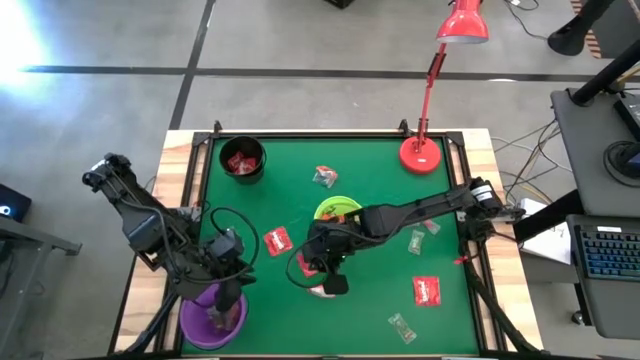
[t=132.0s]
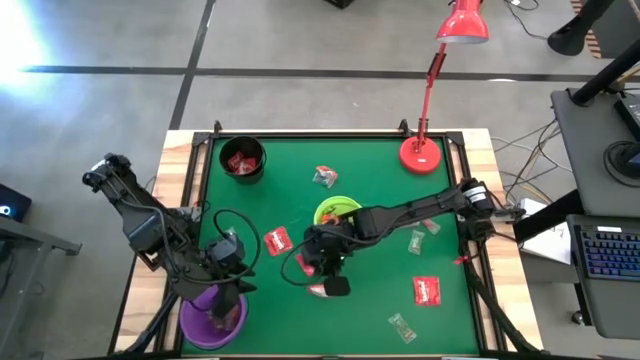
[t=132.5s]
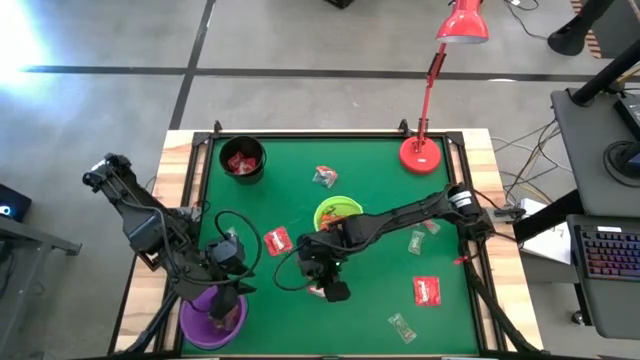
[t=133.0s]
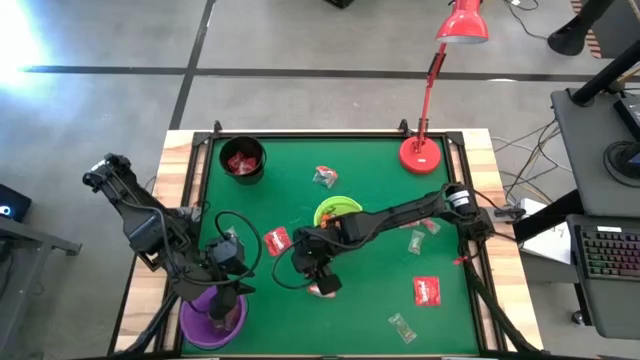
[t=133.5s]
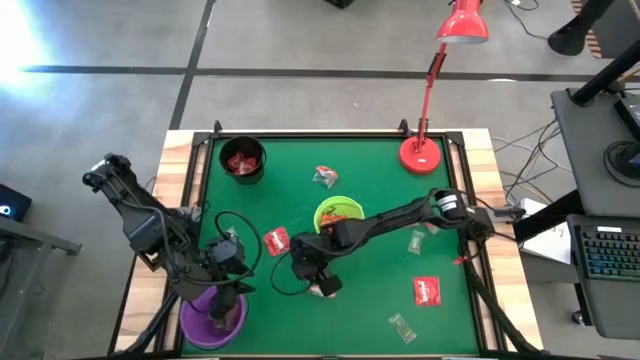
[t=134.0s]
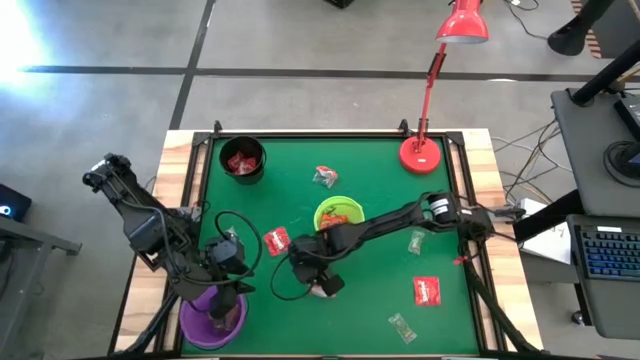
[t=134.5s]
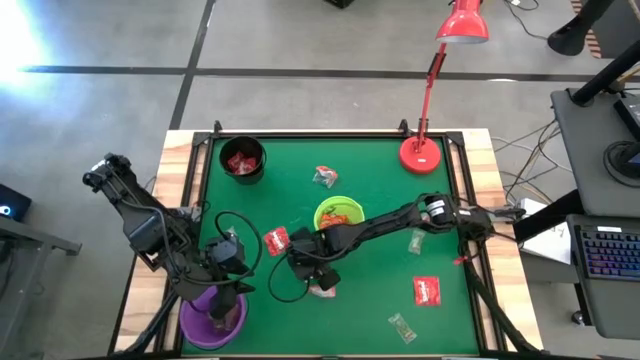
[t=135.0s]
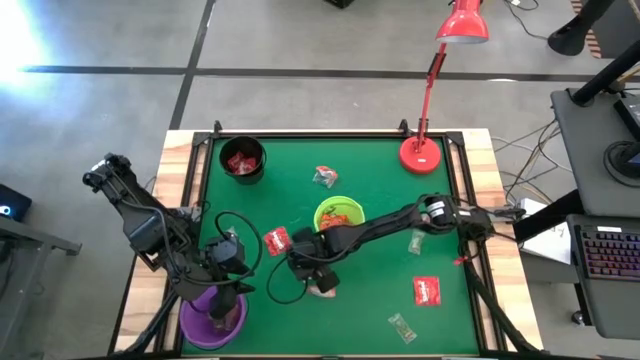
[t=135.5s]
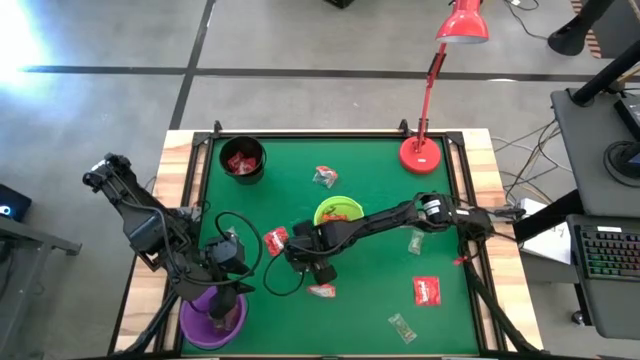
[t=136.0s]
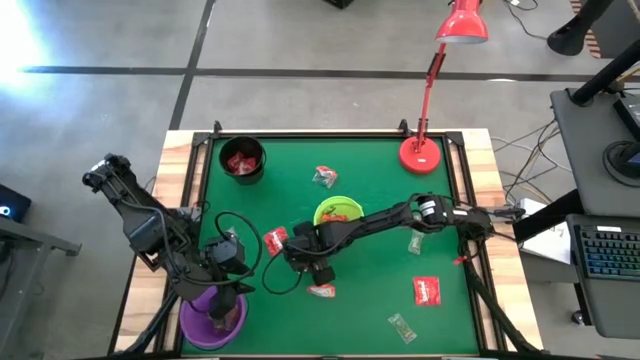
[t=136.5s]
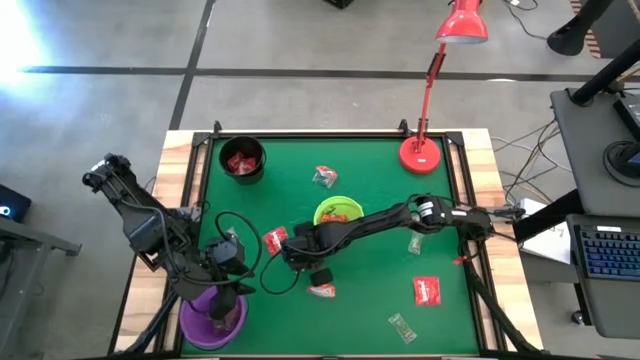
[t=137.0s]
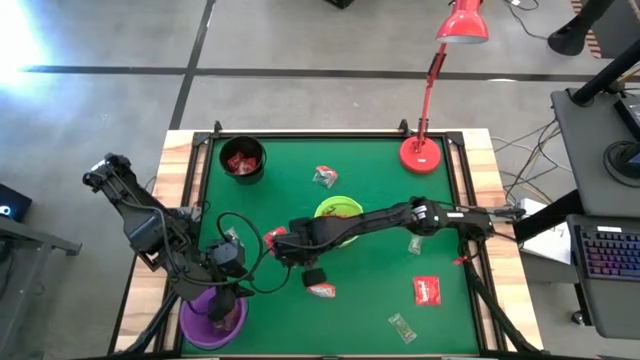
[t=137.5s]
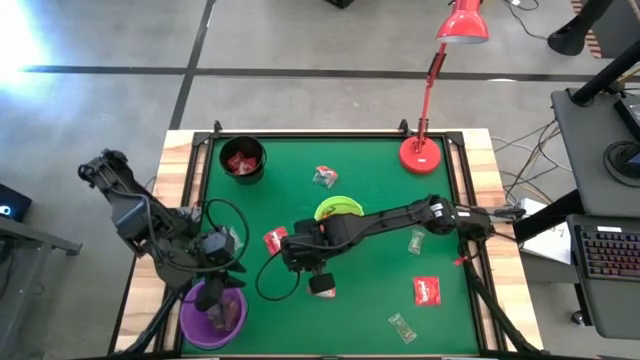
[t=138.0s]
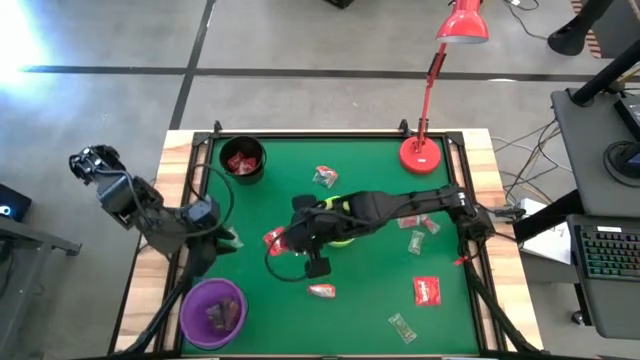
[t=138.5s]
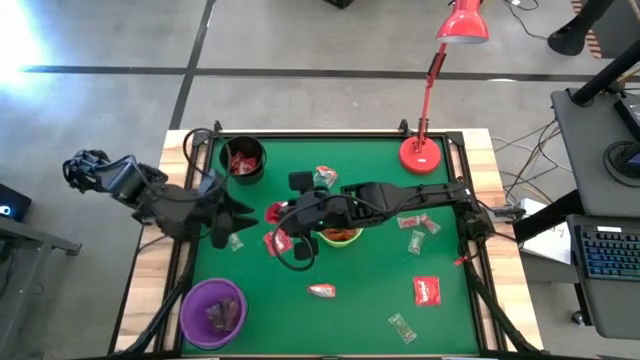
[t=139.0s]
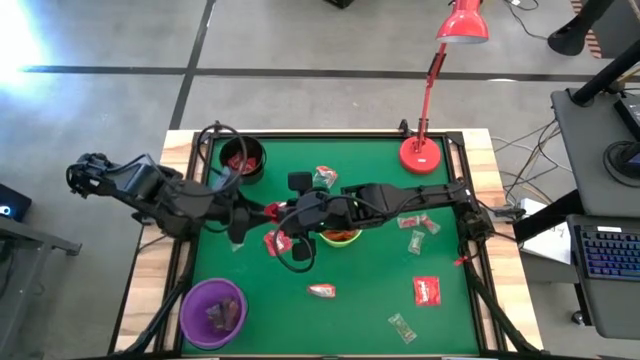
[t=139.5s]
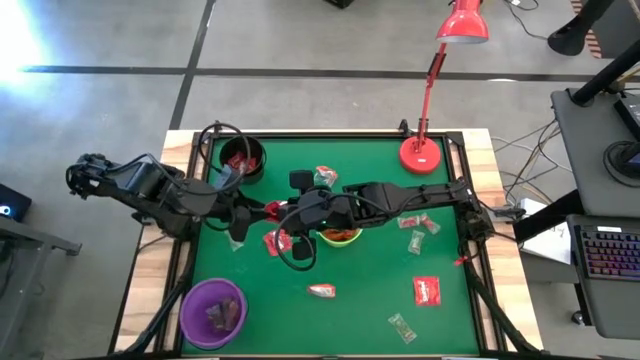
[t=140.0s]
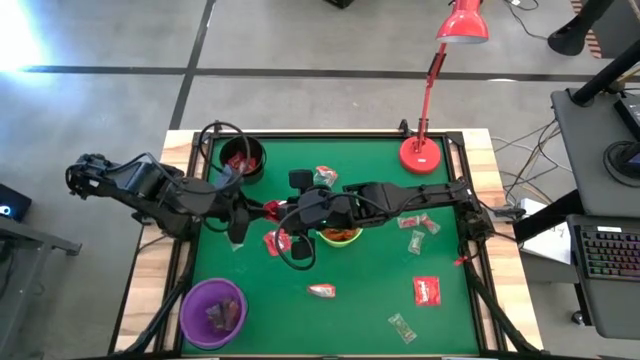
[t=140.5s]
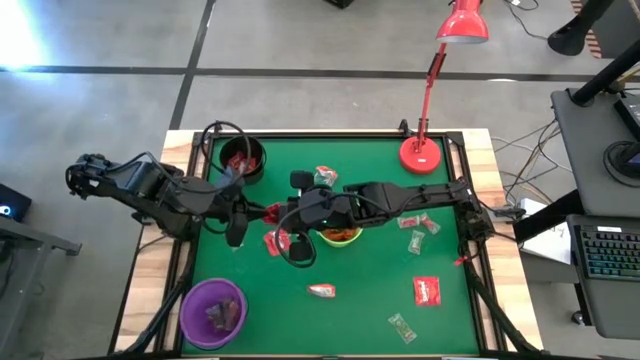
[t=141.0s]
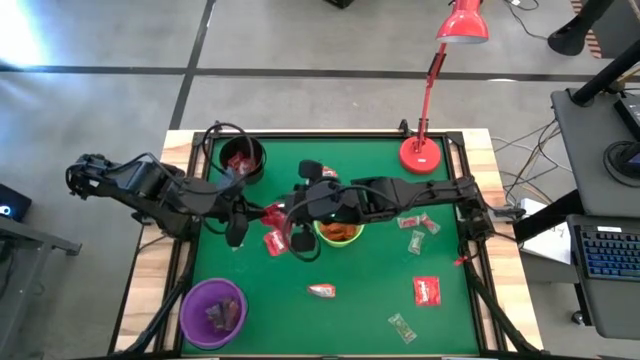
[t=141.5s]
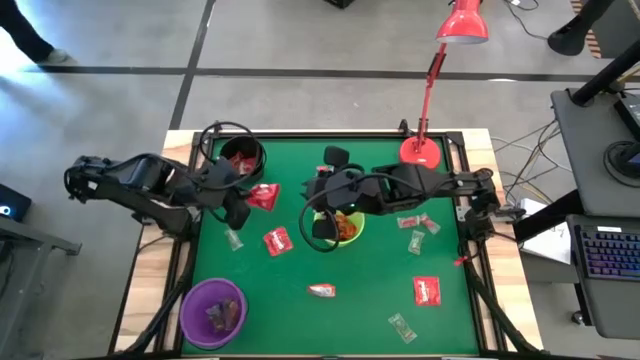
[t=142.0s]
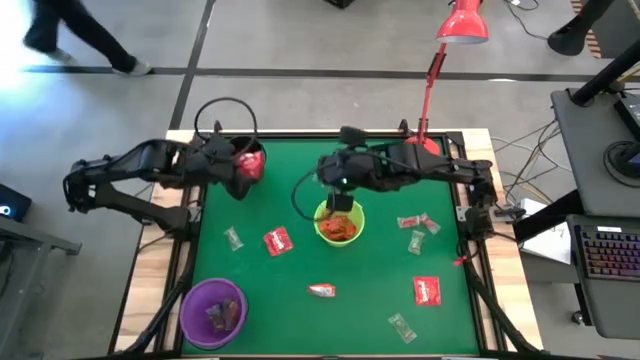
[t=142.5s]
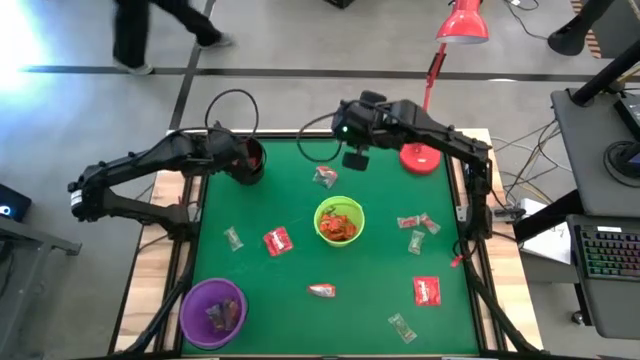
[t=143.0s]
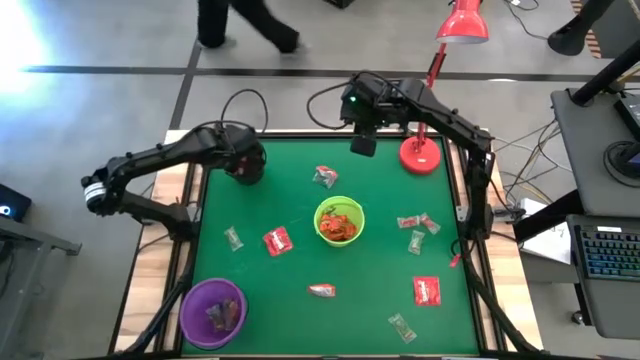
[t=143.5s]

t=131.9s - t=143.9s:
Task: Sort candy
Put the red candy into the black bucket

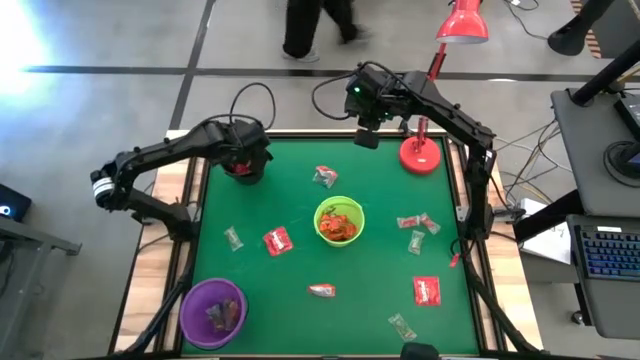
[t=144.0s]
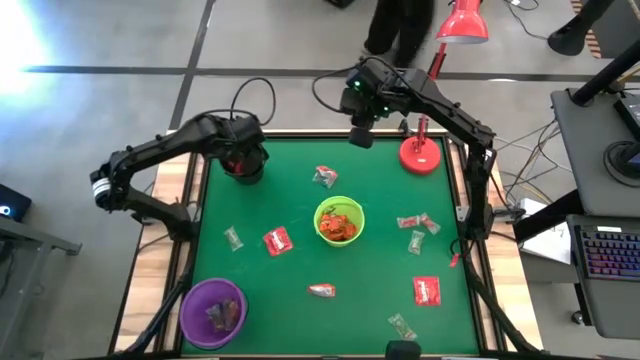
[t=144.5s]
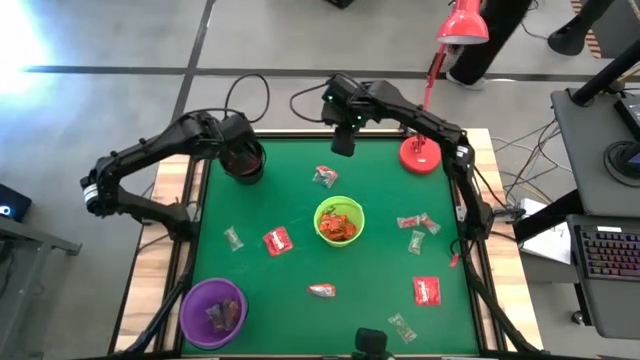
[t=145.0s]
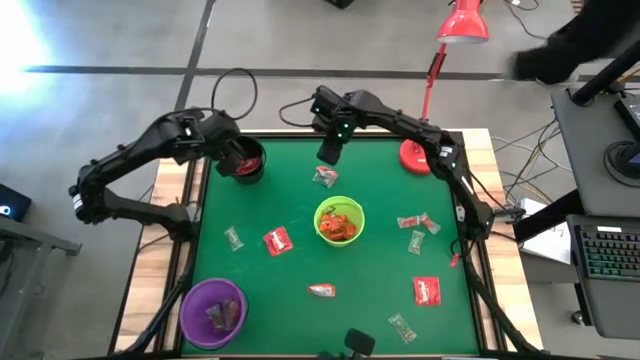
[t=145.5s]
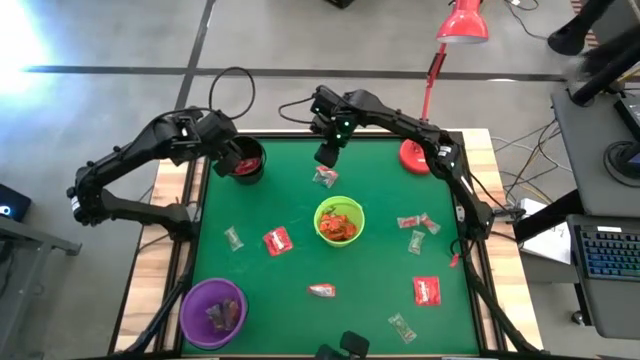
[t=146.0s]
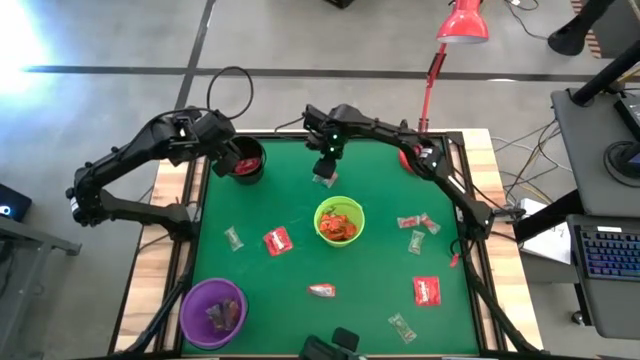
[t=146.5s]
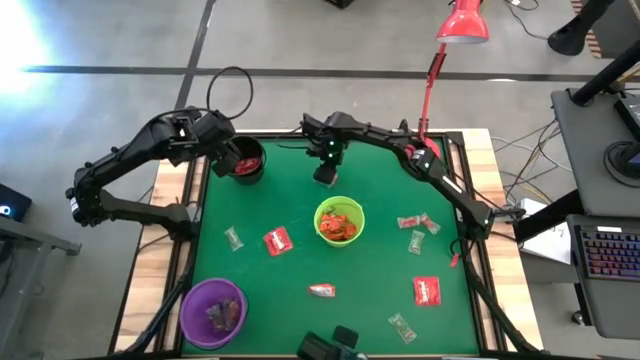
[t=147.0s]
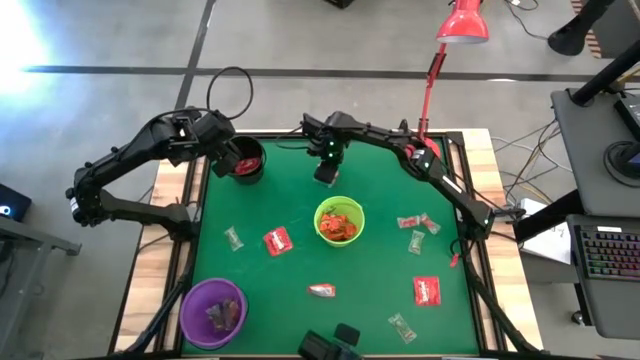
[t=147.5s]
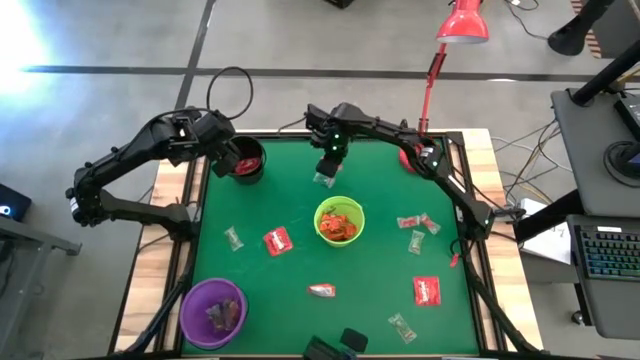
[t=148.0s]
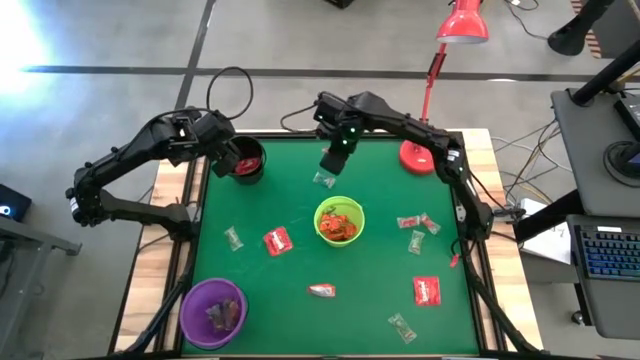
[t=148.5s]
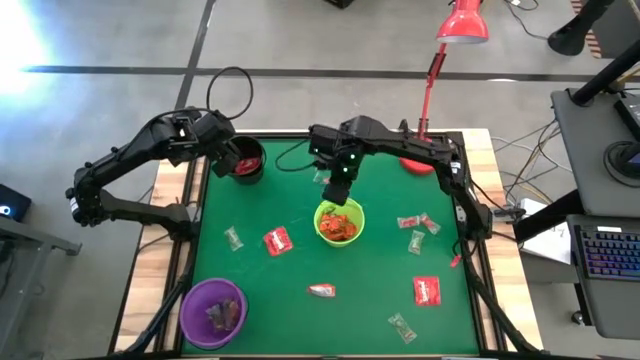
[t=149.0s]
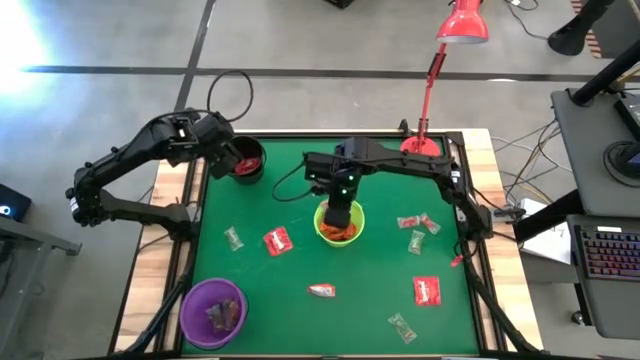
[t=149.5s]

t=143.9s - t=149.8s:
Put the orange chocolate into the green bucket

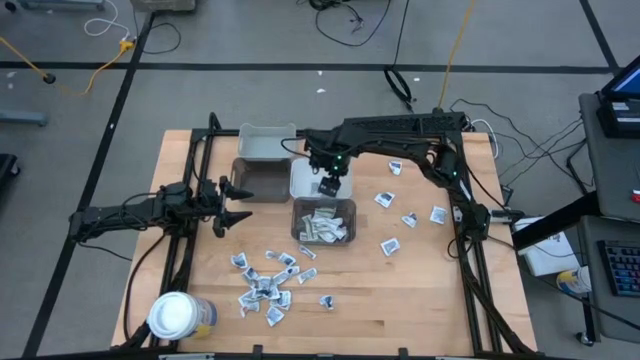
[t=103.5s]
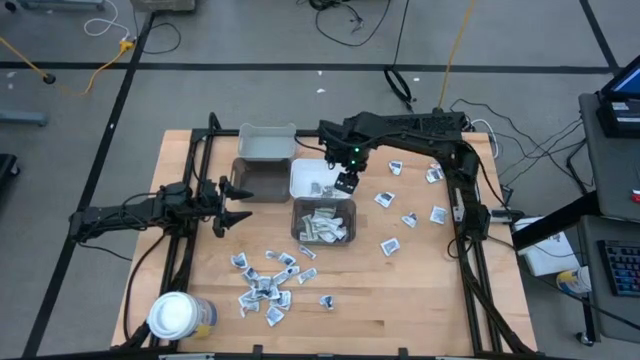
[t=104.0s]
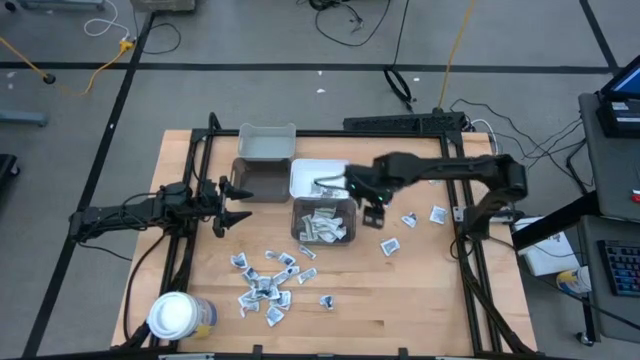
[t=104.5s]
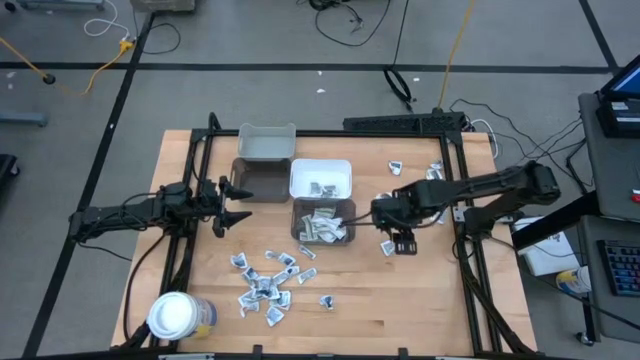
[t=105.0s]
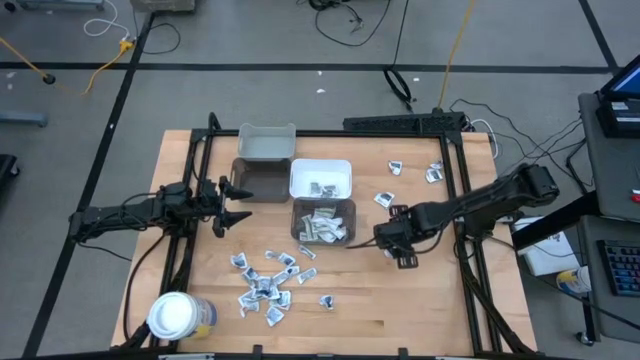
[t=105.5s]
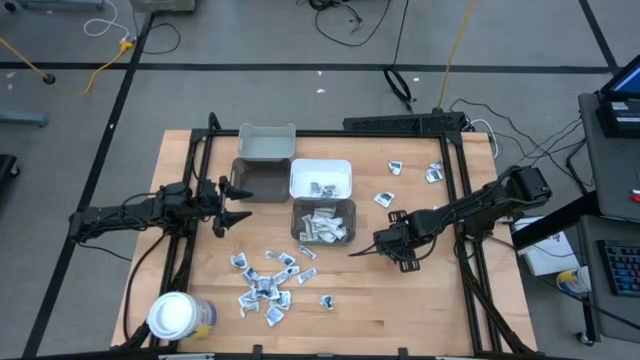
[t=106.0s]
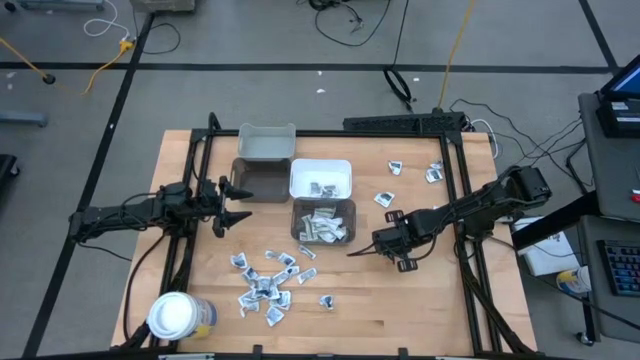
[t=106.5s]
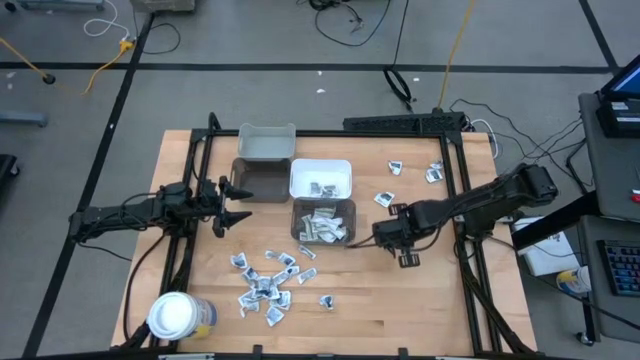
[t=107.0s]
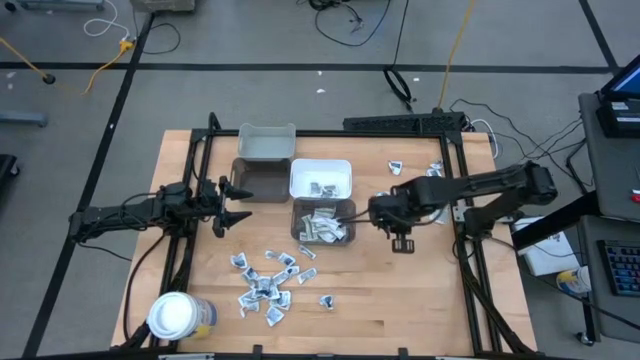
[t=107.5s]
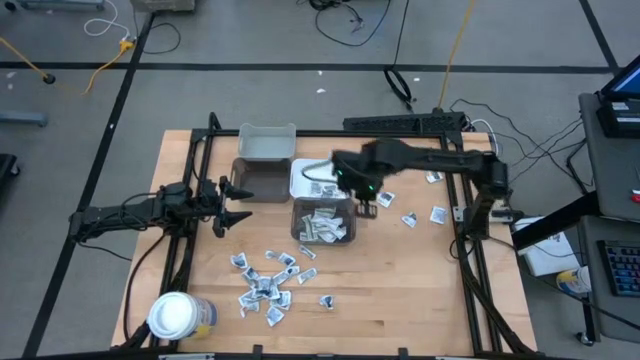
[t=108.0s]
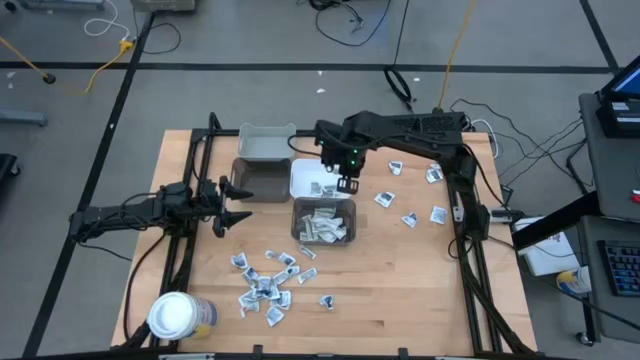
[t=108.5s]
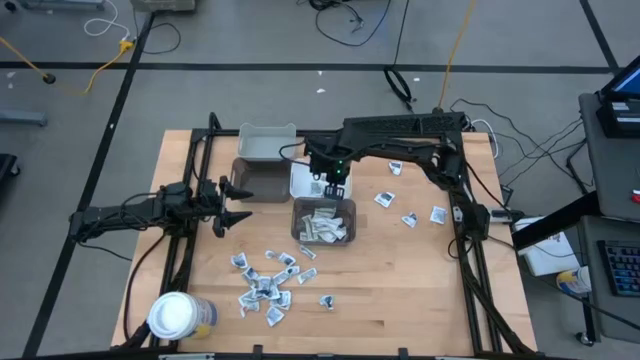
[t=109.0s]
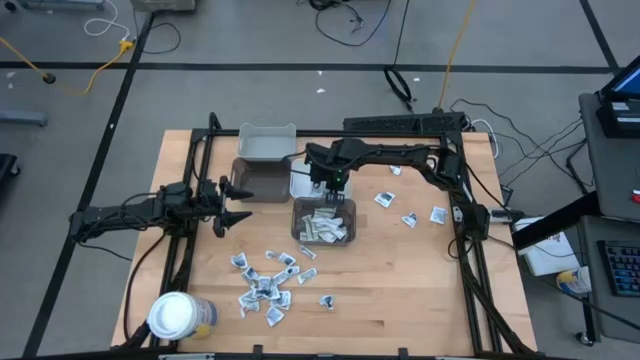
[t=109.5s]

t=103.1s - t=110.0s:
Task: Pick & Place First Aid Supplies
Put the gray towelette pack into the white bin
